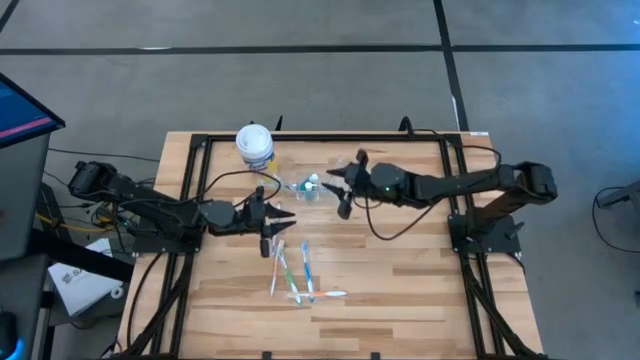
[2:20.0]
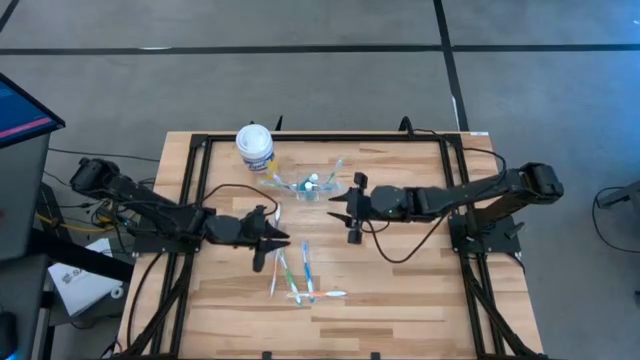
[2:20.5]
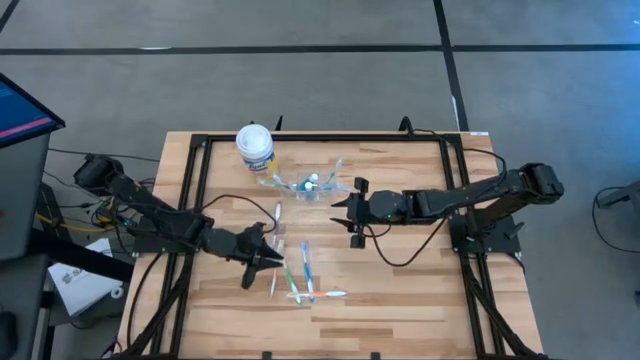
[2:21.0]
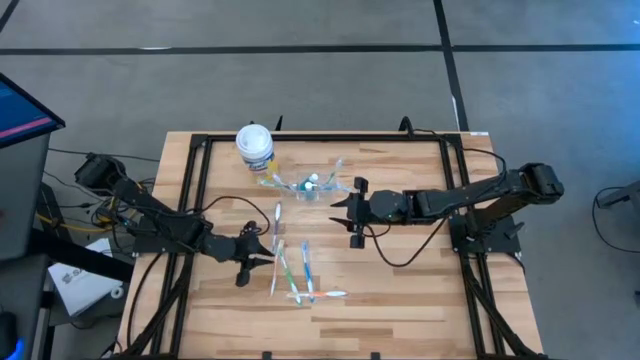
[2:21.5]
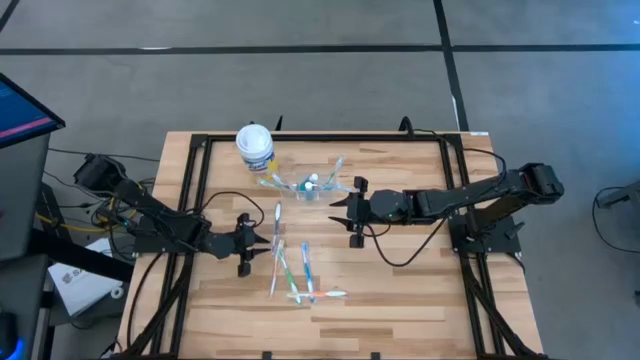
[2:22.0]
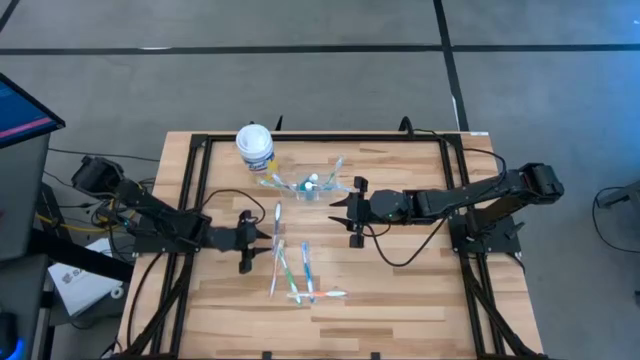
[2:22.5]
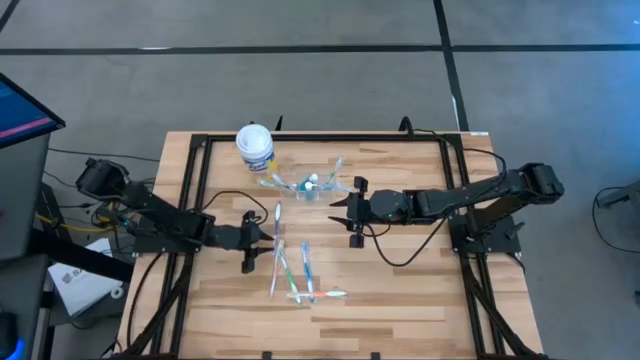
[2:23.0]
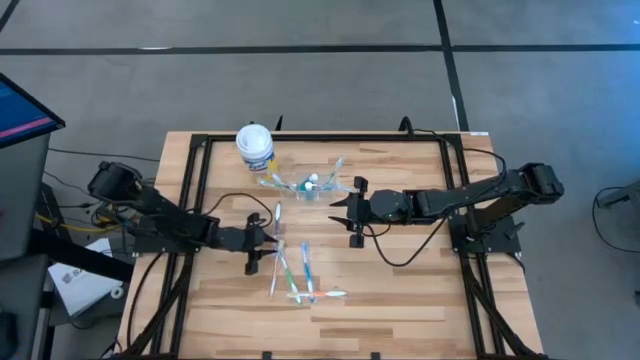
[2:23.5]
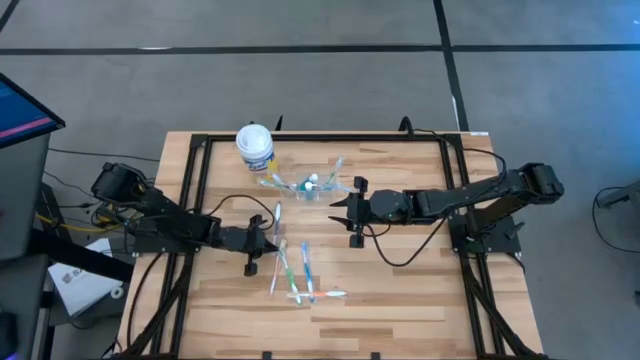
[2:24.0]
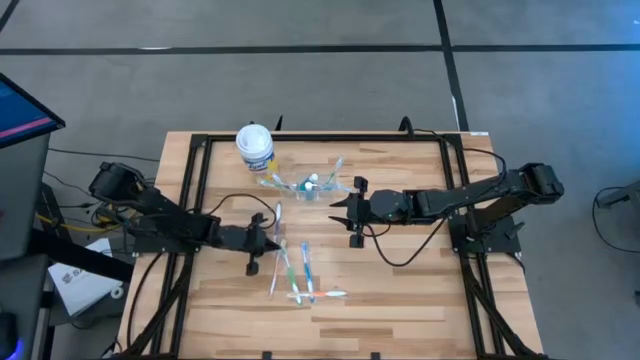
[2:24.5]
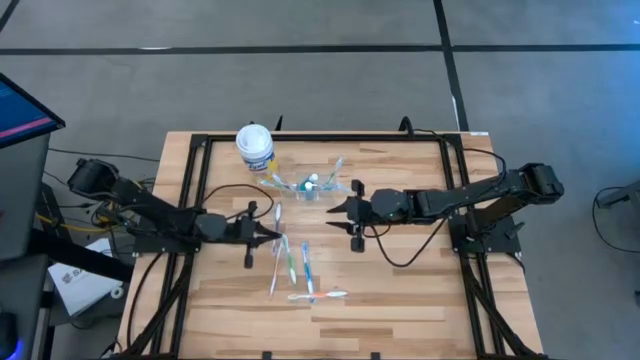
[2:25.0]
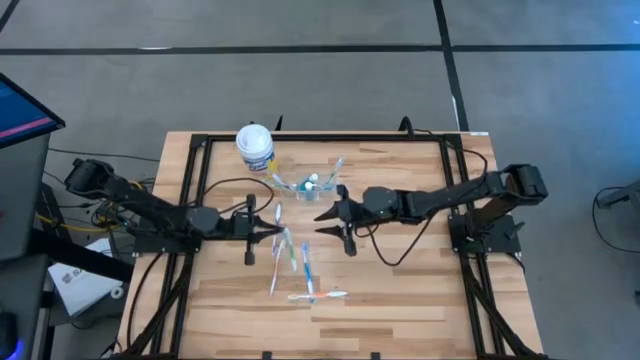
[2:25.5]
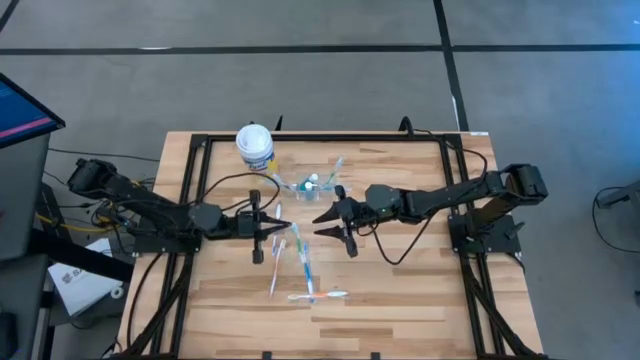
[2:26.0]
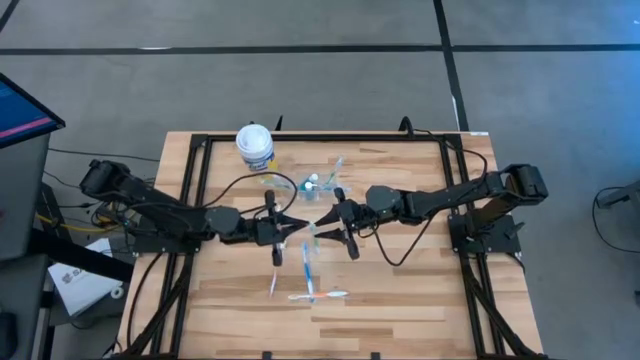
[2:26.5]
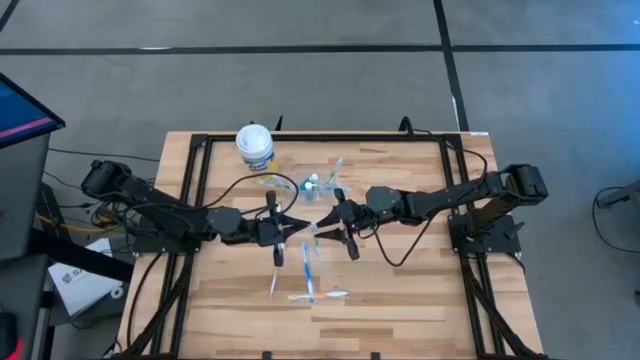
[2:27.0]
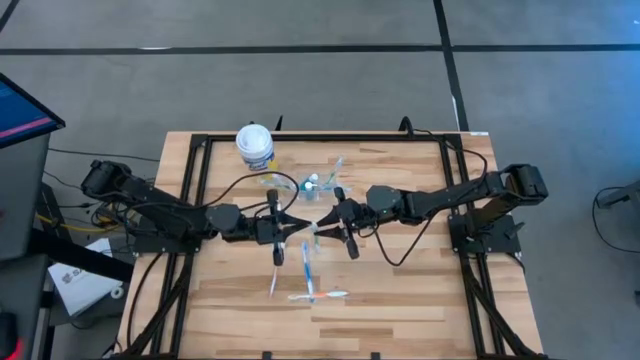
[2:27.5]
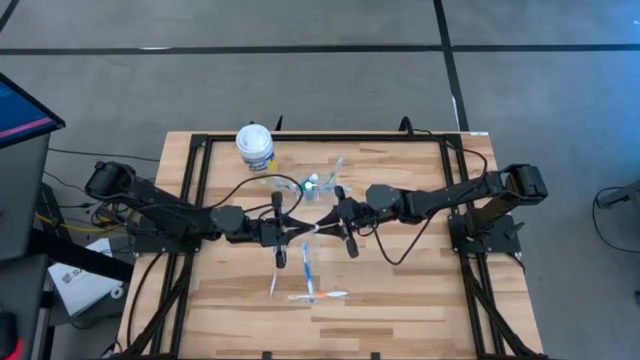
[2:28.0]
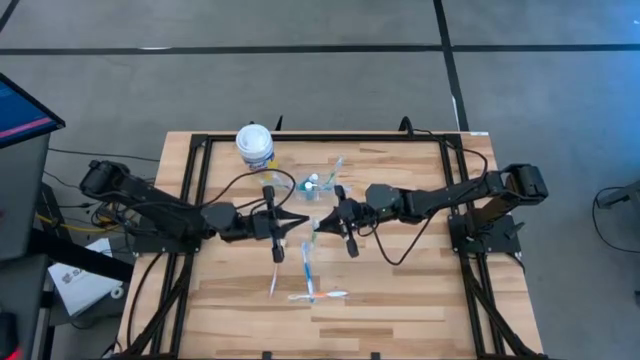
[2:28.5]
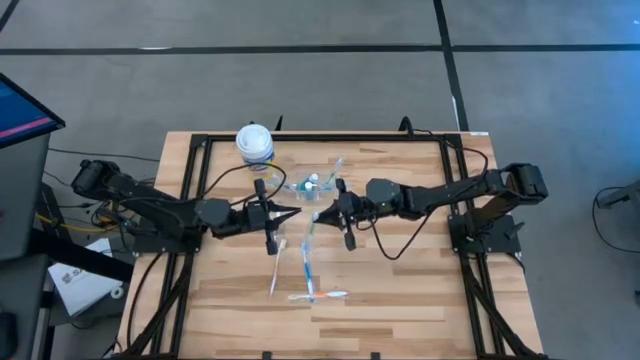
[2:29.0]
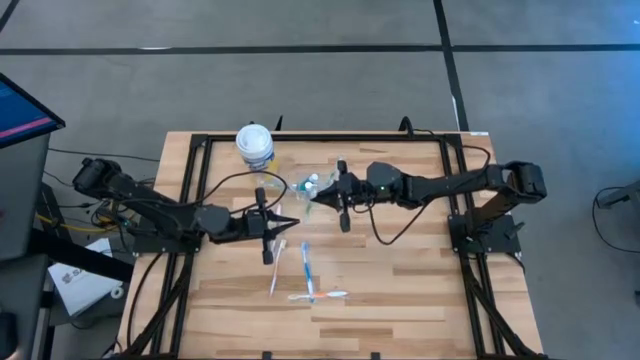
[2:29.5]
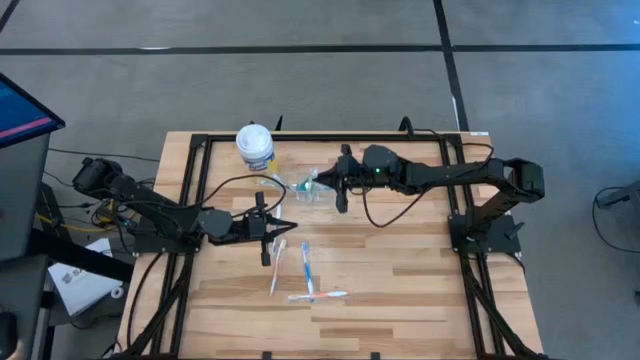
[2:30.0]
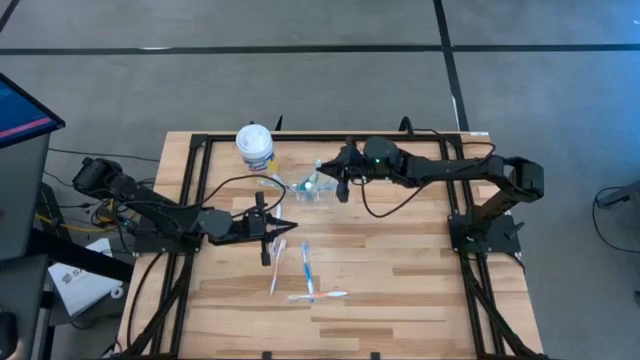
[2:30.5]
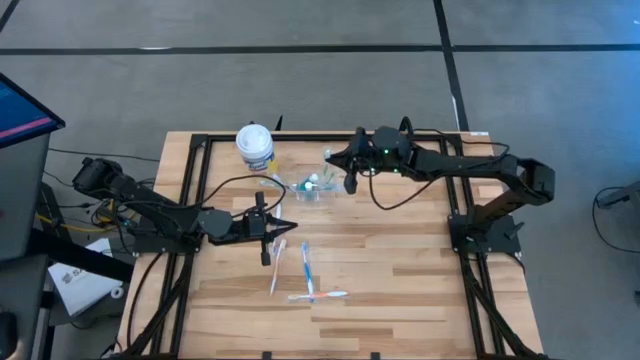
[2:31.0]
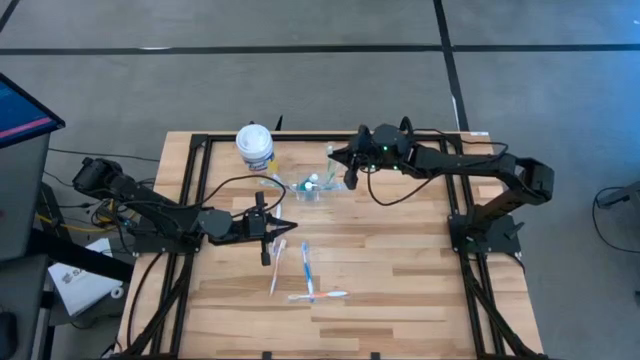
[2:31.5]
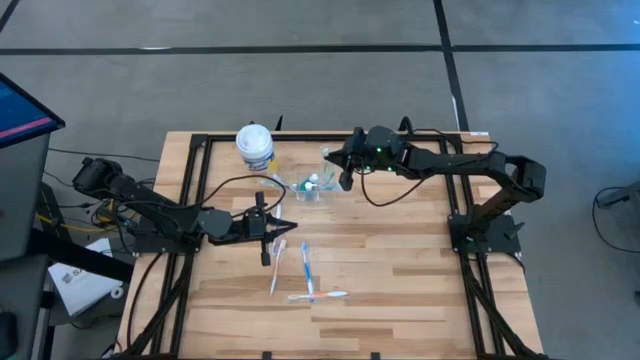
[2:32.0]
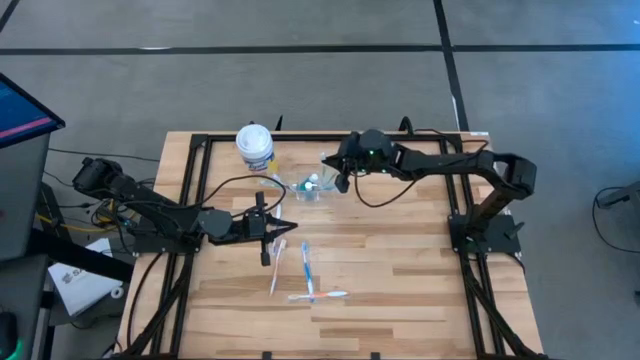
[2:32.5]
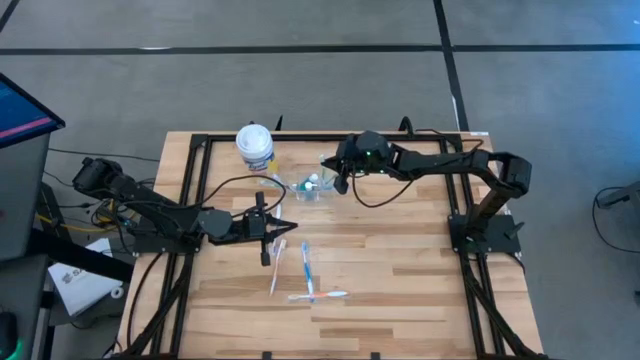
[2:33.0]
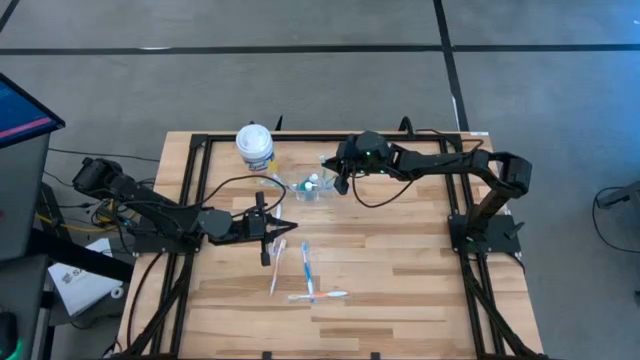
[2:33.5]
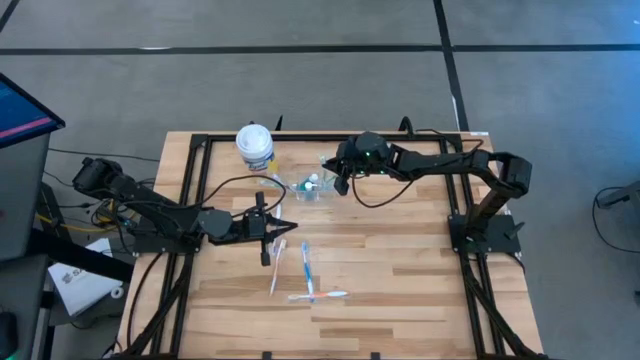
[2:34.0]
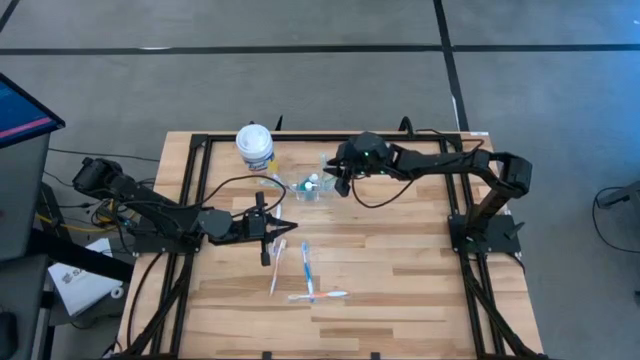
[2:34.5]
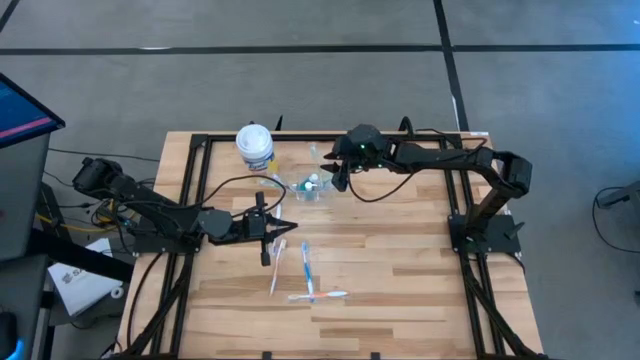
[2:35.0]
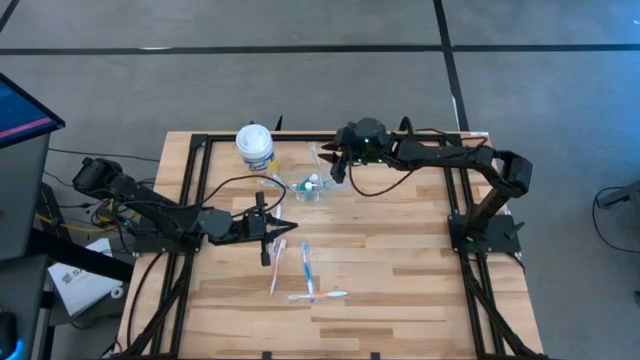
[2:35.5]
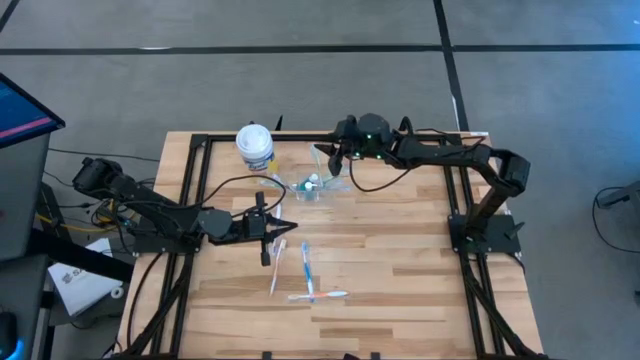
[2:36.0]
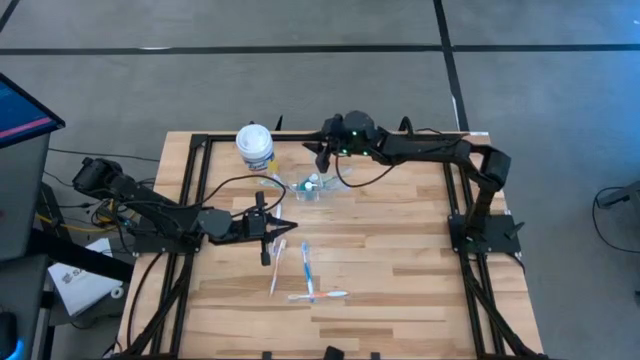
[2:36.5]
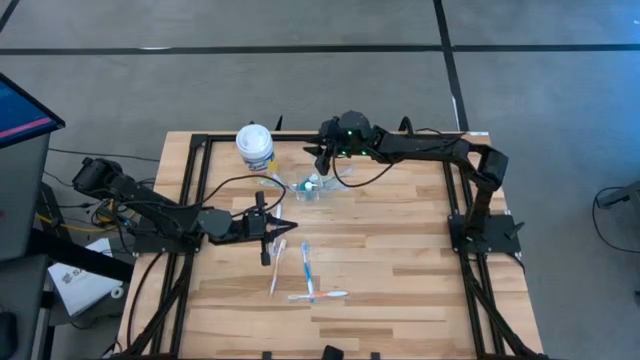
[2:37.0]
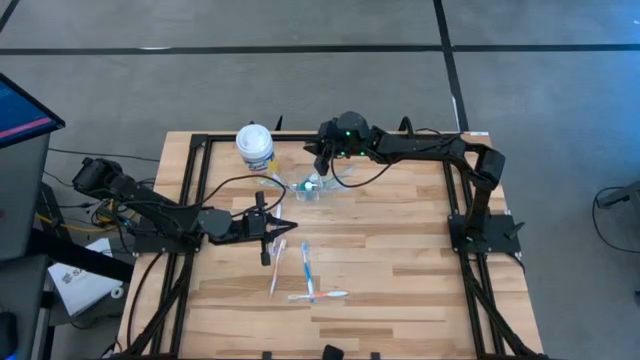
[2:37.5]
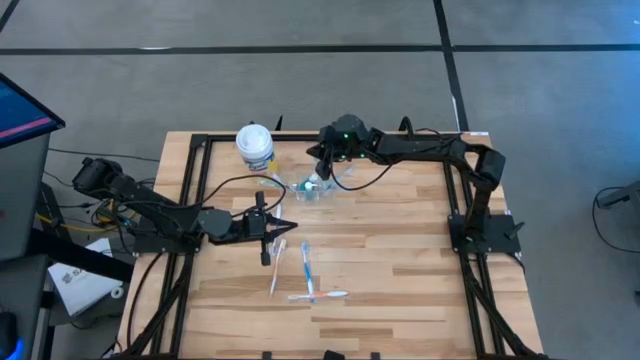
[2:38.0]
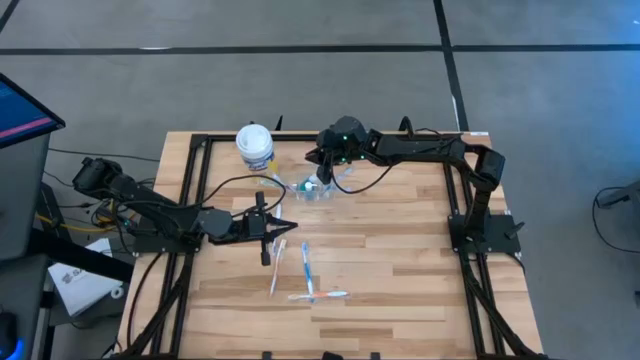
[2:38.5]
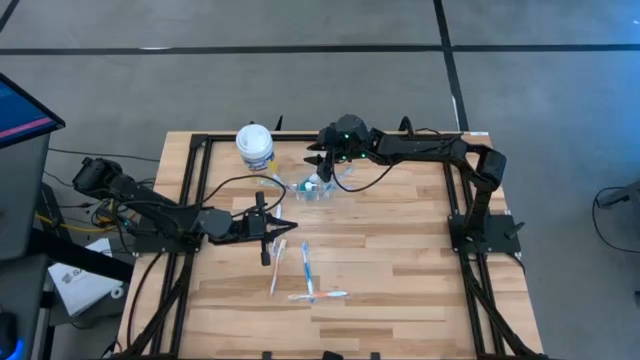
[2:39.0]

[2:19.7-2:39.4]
Task: Pick & Place toothbrushing station
Put the green toothbrush into the transparent organizer
